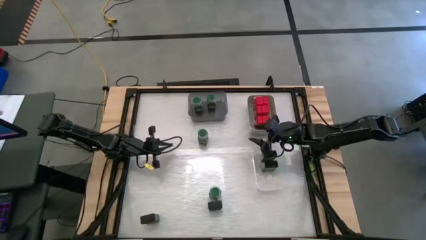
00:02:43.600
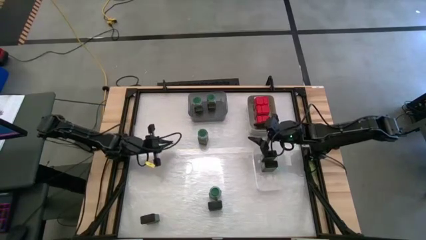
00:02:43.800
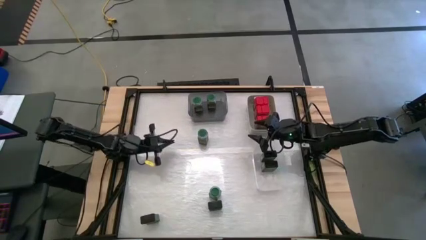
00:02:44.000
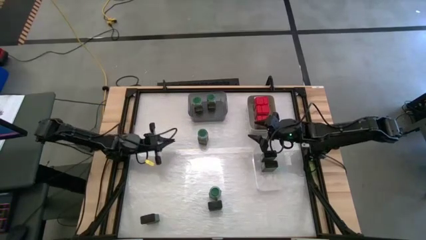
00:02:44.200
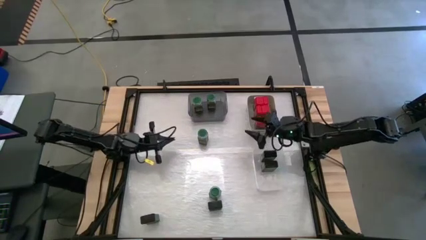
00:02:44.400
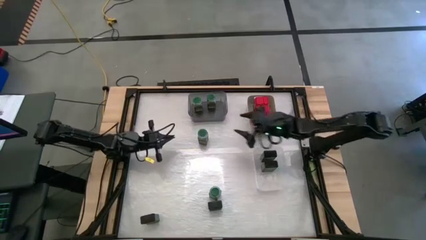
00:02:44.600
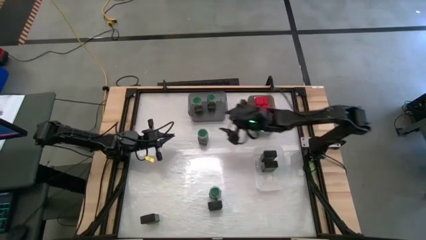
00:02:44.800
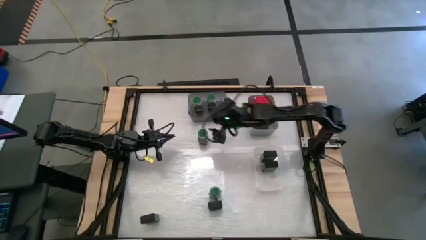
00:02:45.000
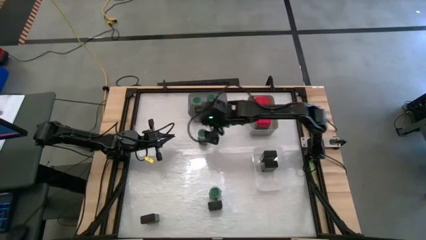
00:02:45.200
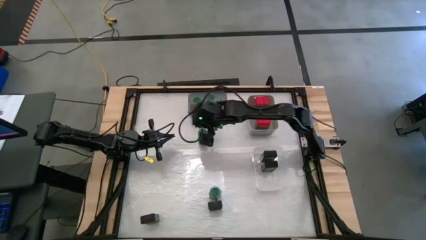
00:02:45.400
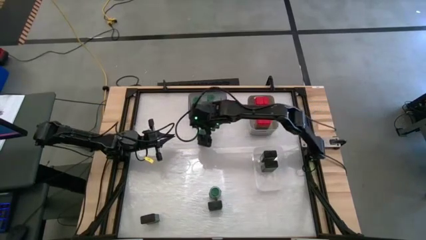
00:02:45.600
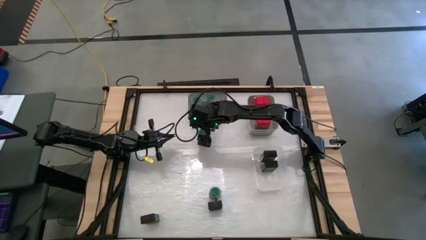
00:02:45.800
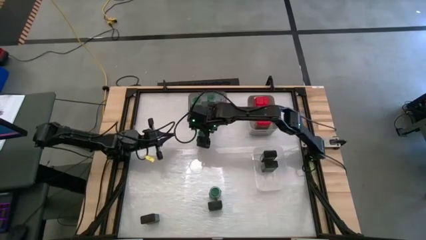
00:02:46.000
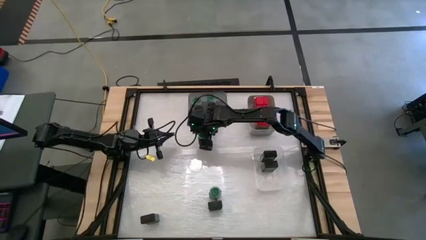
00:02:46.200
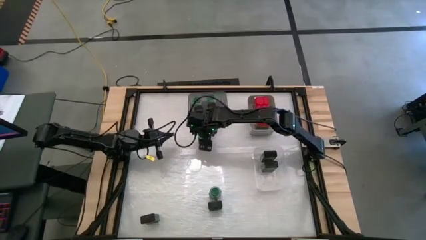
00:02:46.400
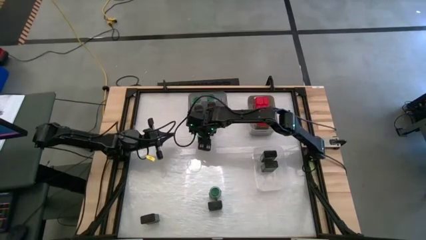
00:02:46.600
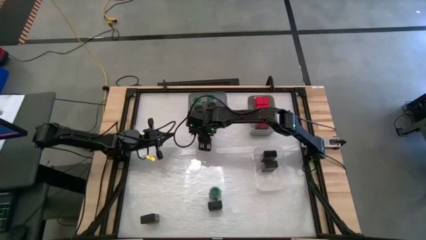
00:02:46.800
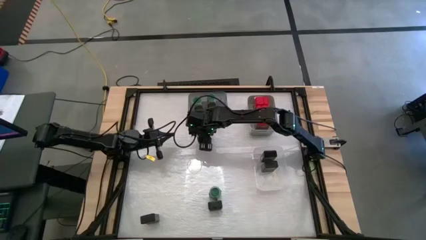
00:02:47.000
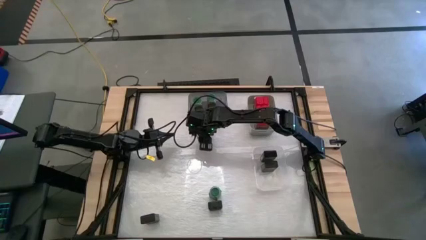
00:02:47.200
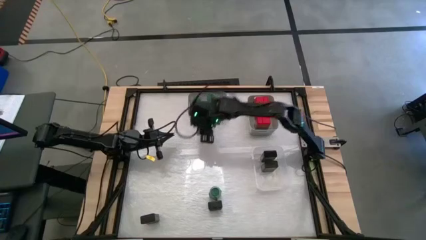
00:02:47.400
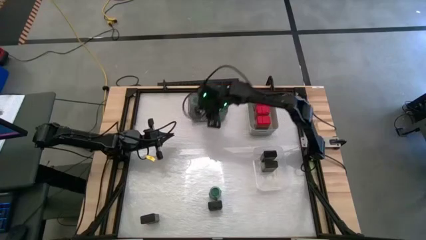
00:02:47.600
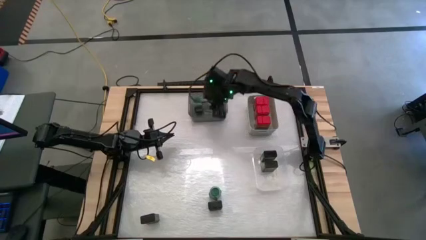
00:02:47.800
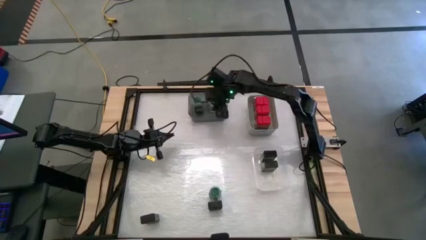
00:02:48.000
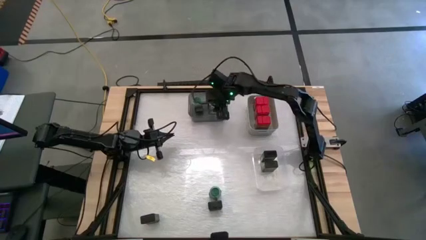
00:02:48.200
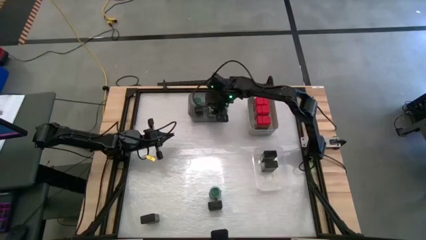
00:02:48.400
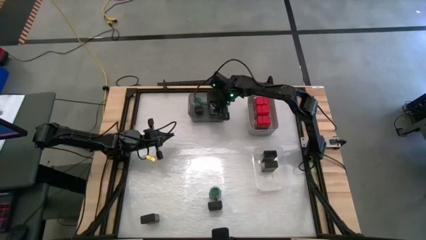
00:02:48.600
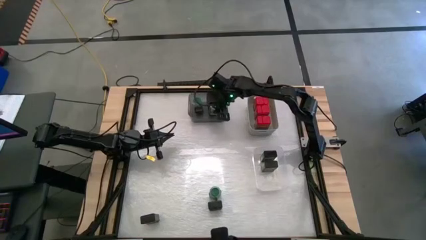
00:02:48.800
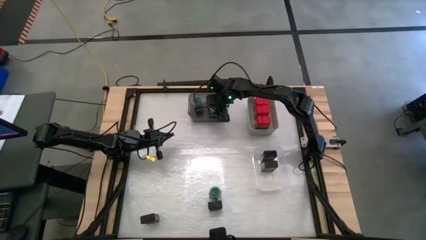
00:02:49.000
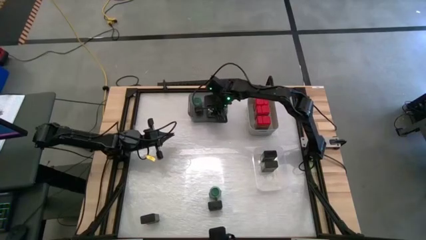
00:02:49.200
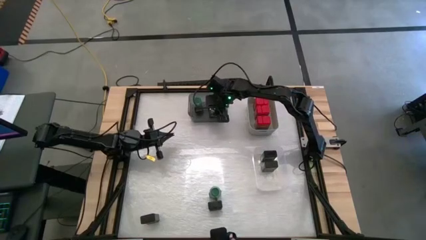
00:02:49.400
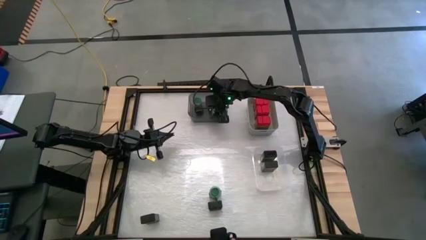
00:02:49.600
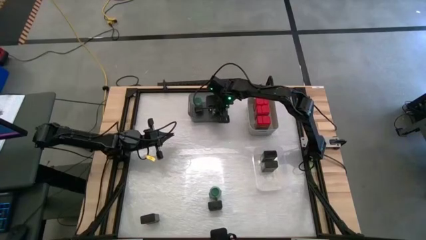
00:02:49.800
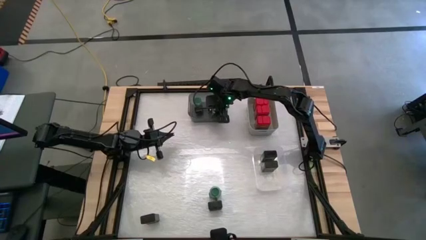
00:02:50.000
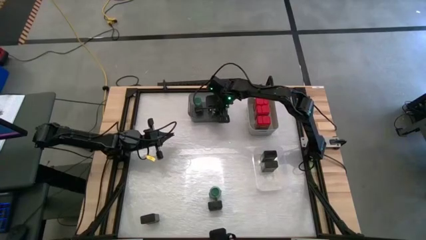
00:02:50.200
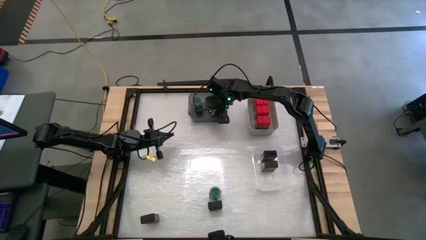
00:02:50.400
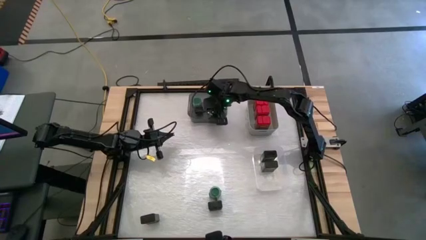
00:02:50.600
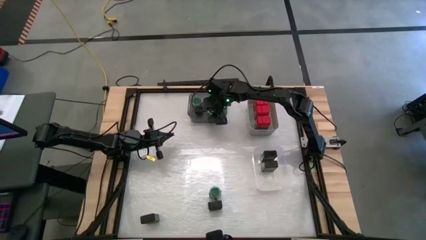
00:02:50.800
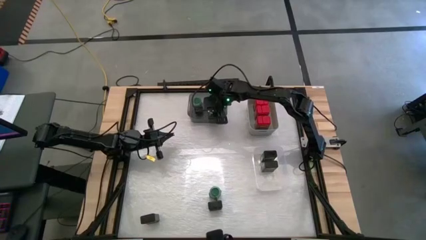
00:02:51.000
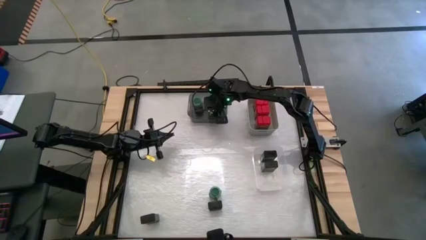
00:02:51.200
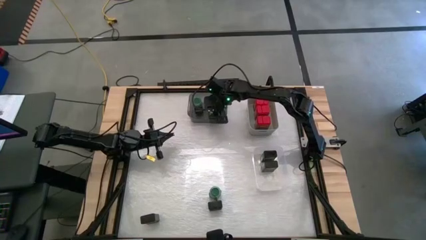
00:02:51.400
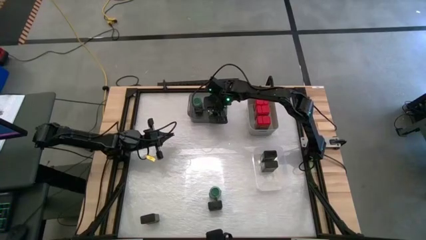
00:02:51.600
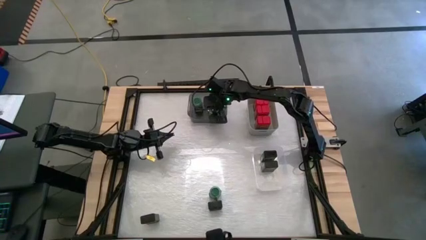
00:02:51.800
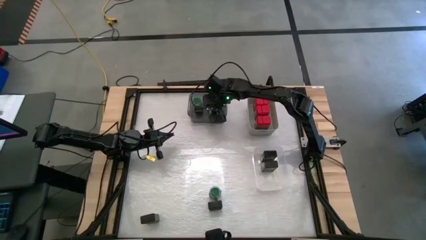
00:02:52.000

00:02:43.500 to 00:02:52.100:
Task: Sort spices by type
Put the center green seasoning bottle into the black bin

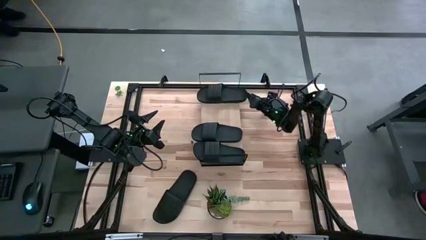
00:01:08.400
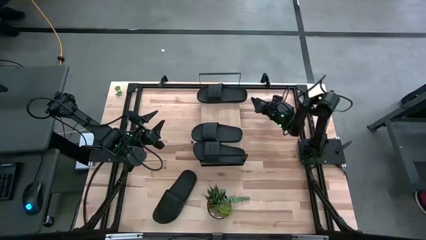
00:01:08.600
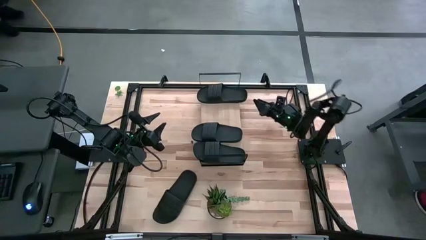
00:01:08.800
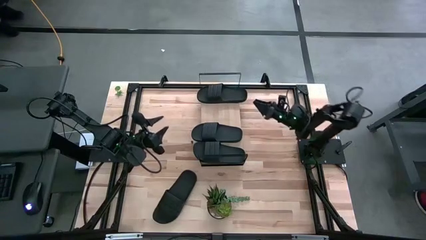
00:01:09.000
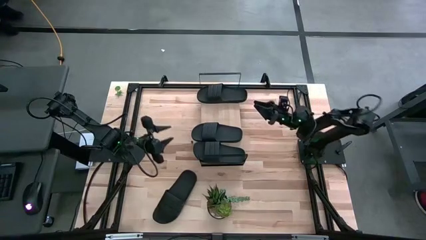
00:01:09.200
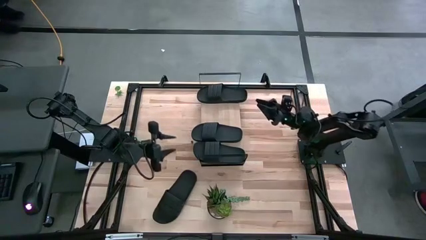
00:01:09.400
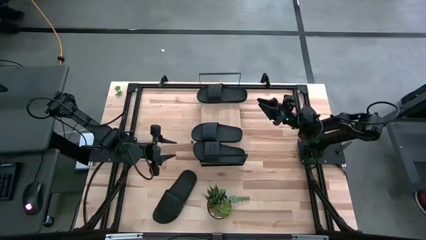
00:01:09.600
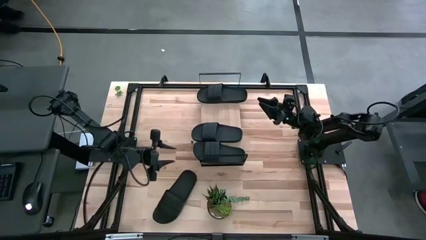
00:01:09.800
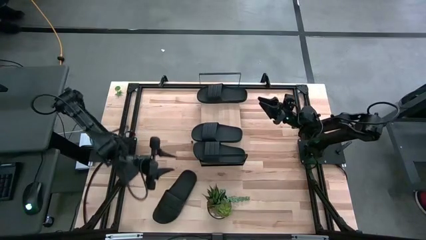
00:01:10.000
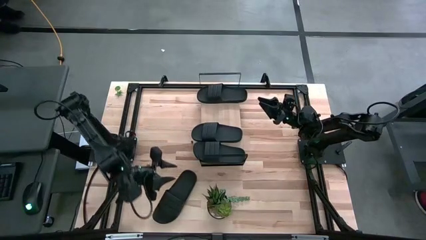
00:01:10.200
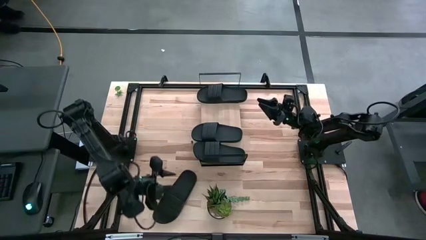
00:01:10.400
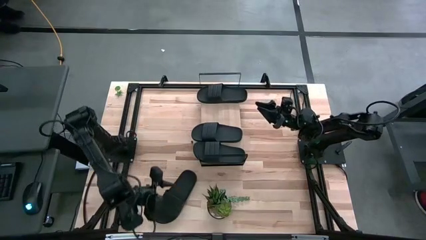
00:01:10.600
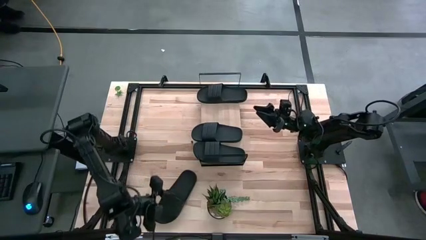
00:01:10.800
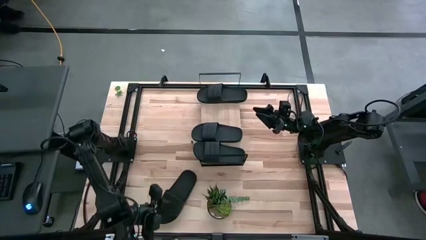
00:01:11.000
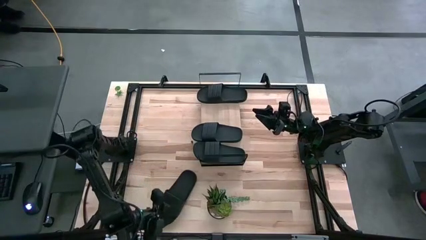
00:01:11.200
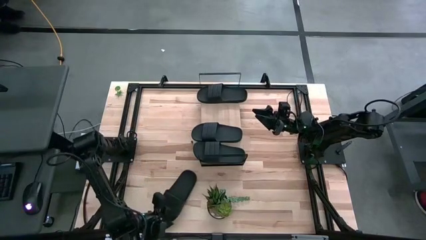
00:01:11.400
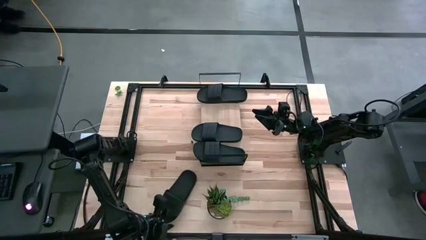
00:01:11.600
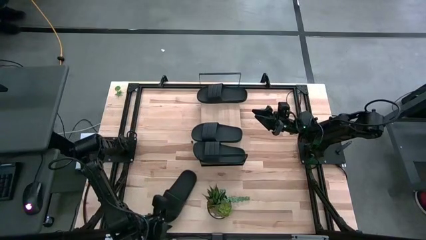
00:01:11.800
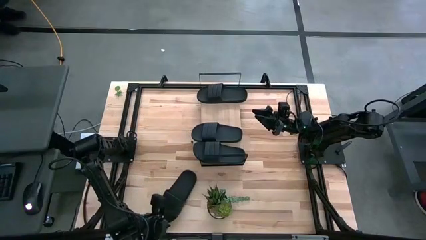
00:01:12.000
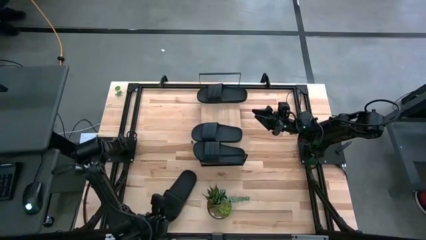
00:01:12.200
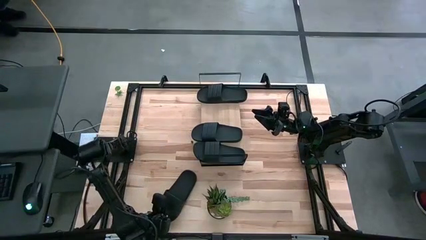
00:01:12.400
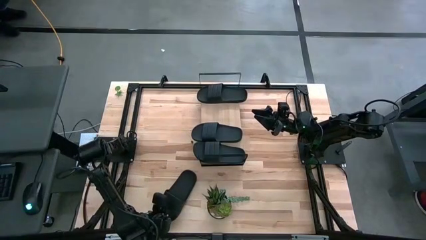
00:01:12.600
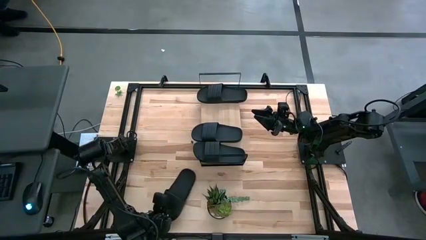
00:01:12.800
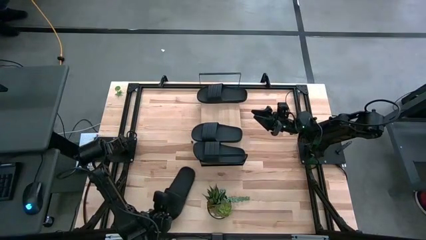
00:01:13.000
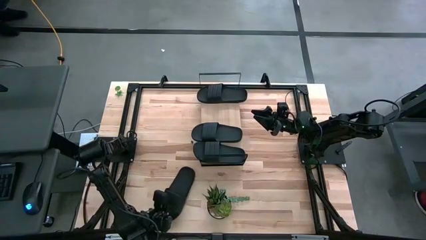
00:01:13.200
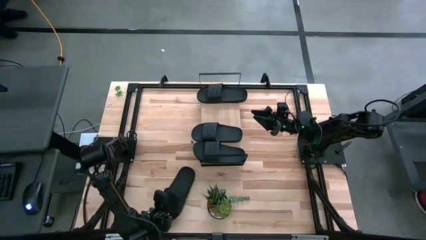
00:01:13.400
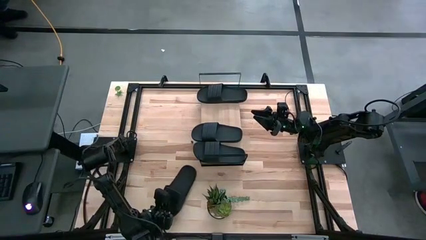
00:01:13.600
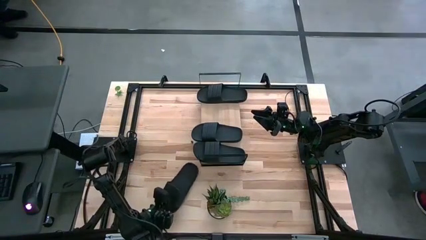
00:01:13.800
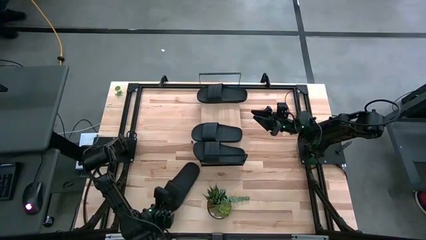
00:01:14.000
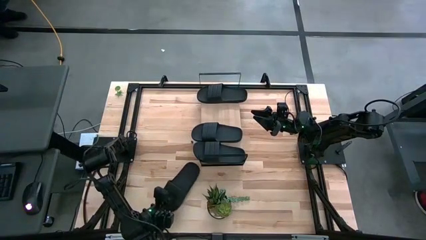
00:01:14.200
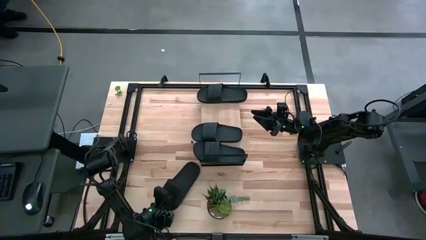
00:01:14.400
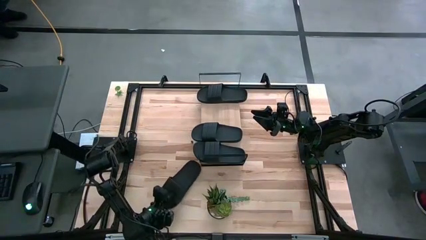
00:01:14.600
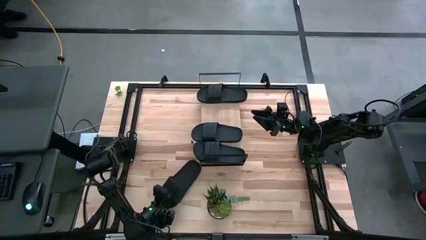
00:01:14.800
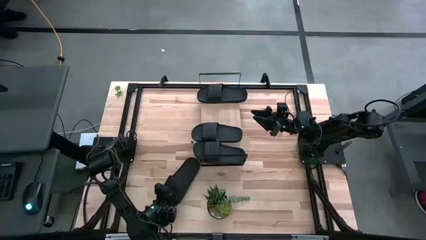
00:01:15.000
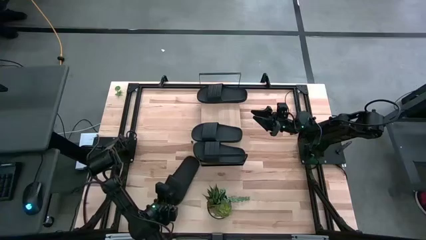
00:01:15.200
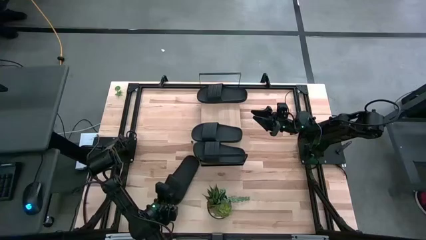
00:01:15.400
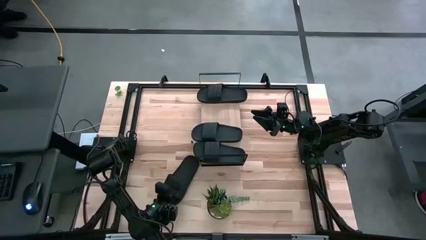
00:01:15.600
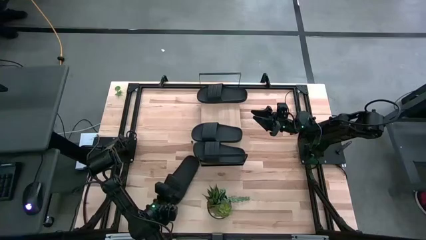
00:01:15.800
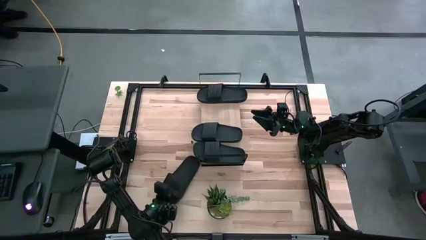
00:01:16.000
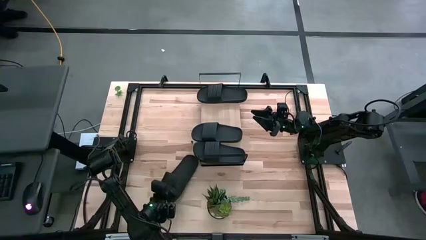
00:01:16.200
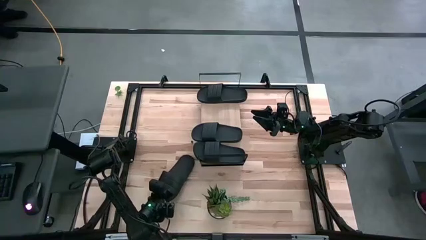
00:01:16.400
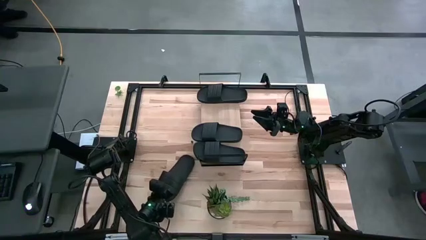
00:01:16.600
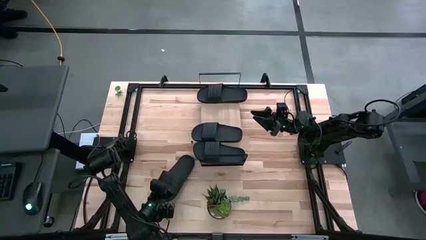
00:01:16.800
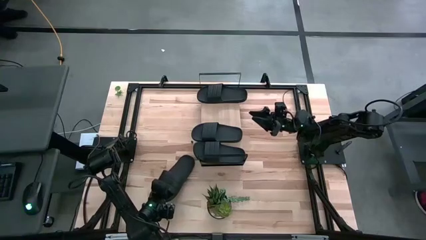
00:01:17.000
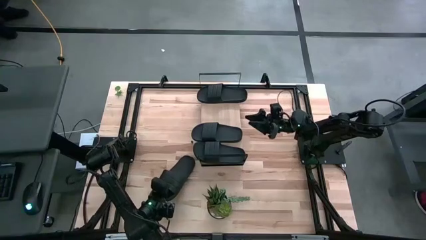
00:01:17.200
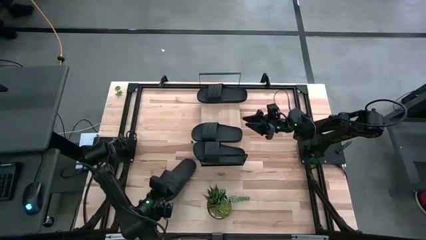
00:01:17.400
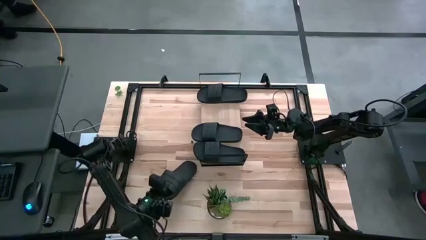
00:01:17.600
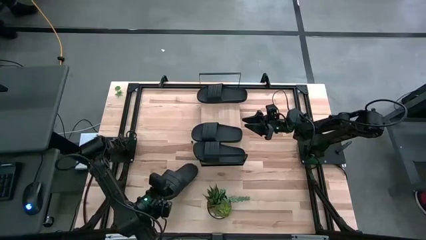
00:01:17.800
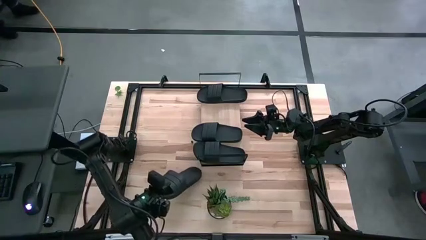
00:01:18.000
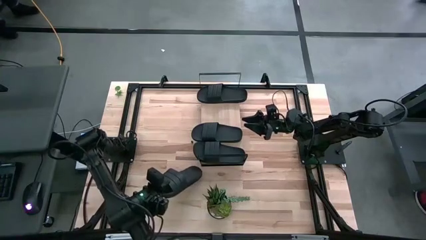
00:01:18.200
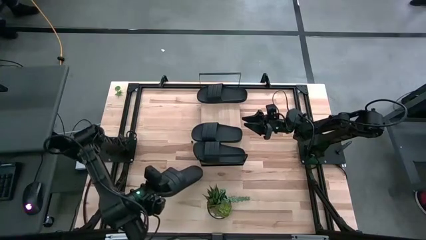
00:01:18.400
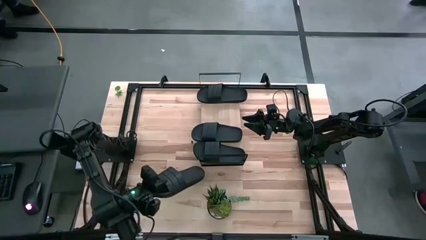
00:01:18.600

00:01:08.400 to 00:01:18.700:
Task: Pick and place slides into the shelf
Put the black slide on the shelf
